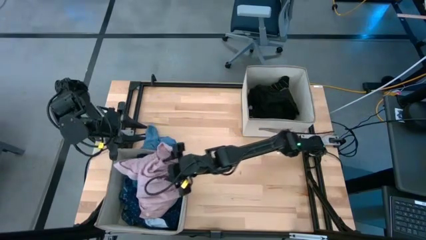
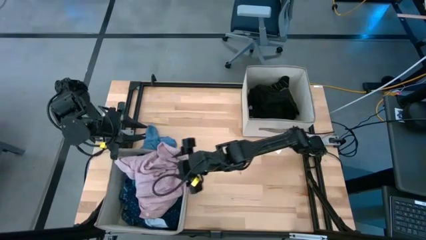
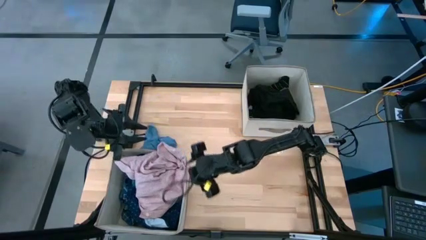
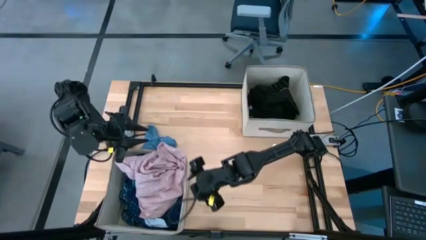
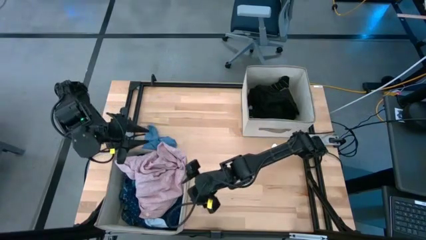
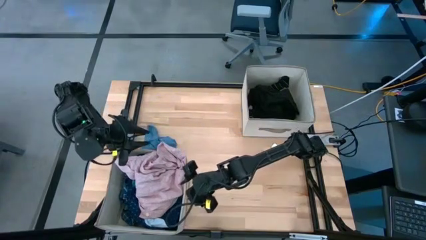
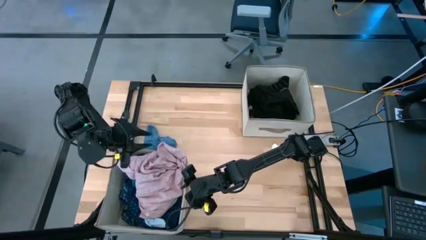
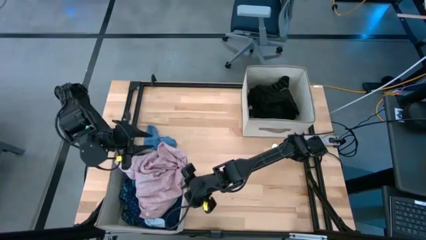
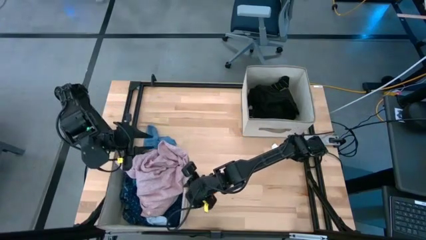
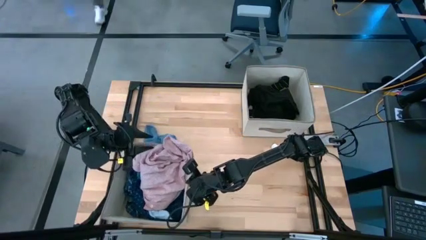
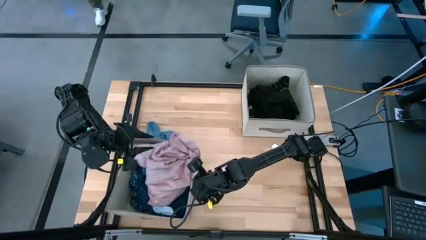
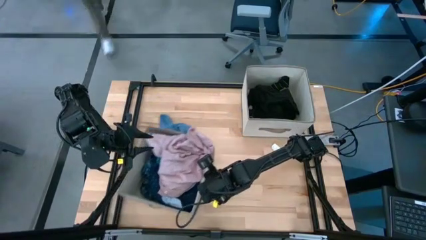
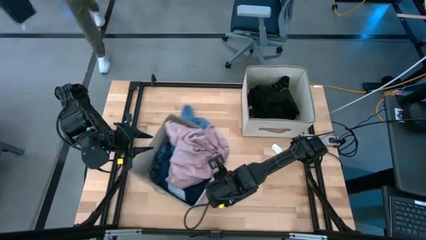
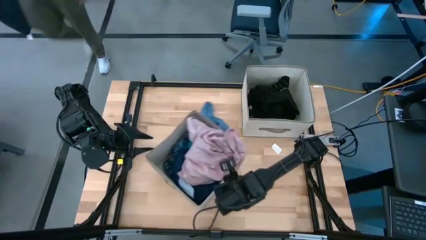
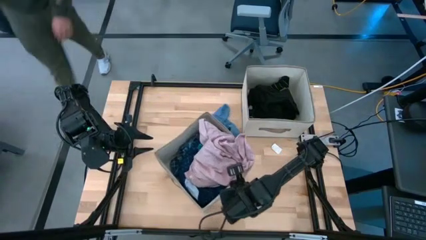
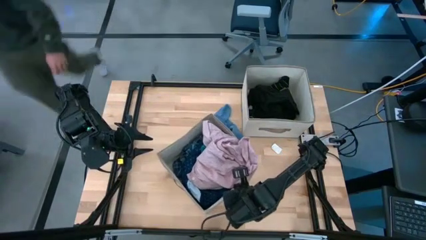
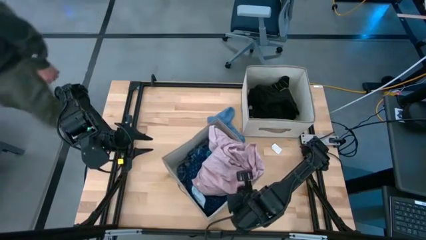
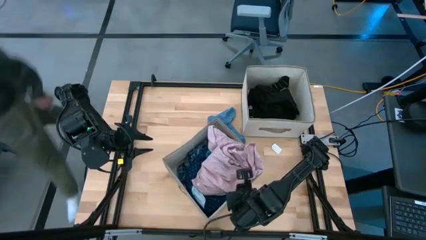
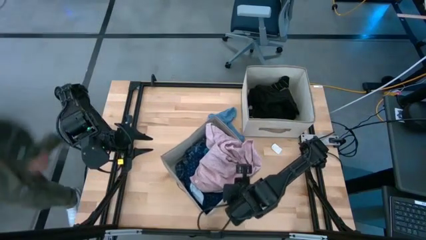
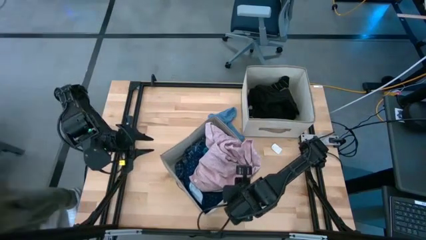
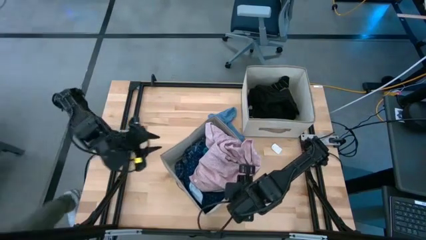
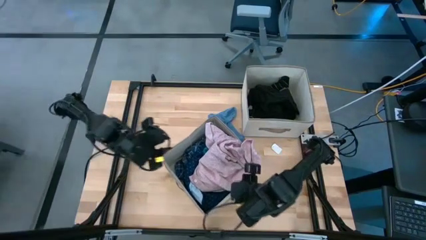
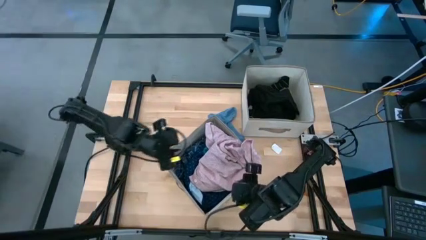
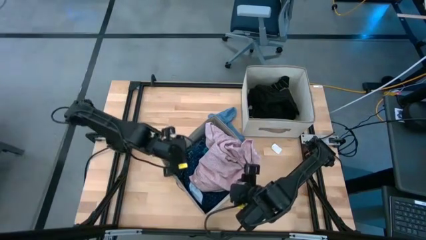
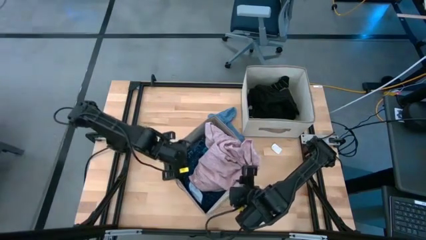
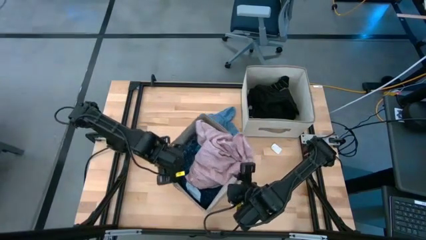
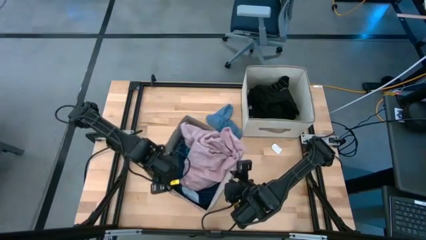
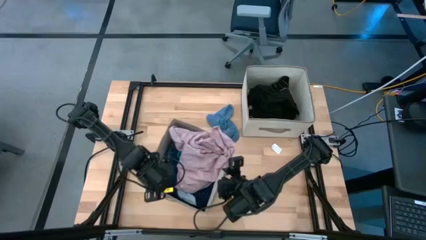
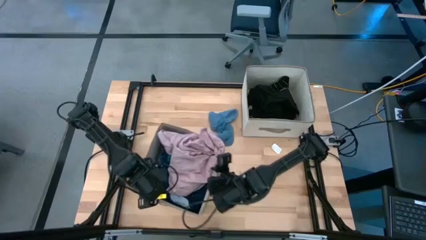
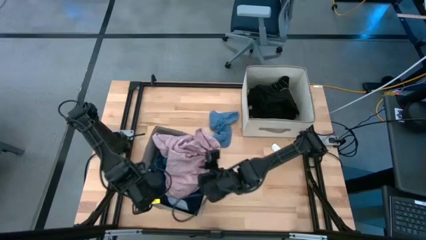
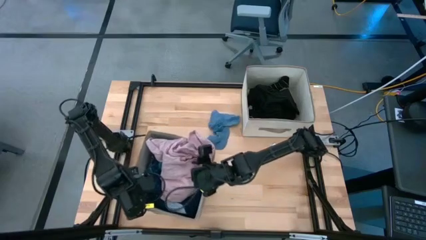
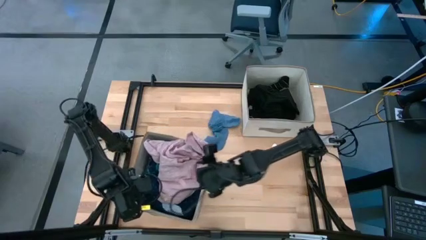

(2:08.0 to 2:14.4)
Task: Sort clothes
Adjust the bottom white laundry organizer on the table

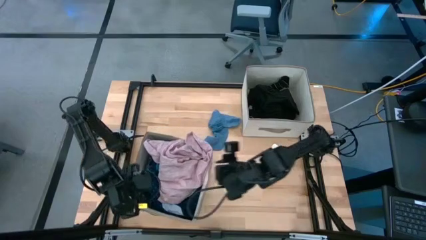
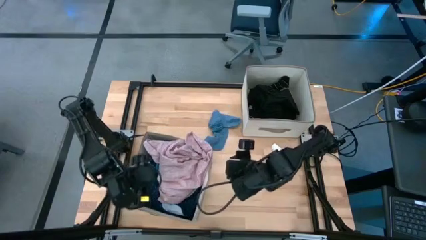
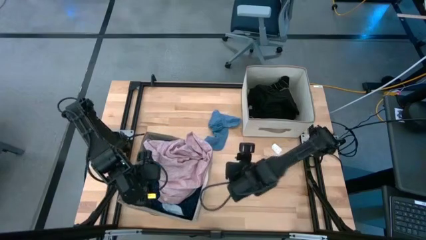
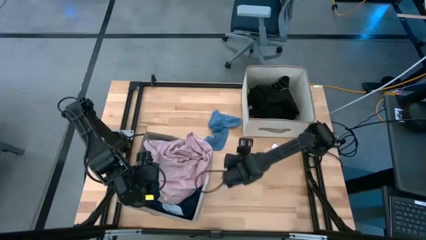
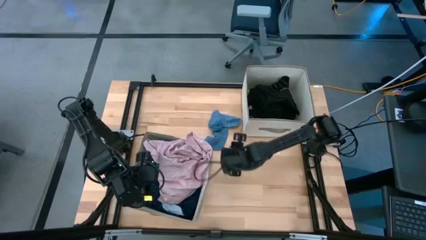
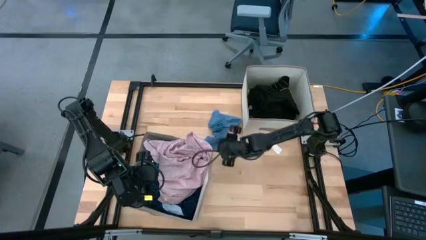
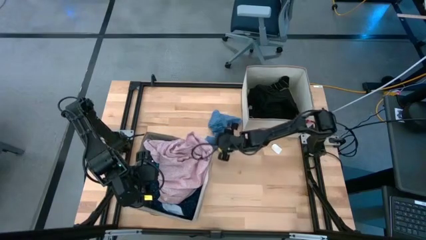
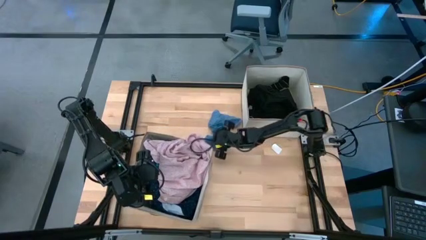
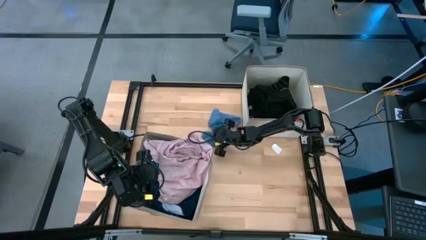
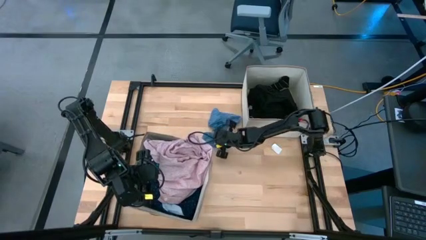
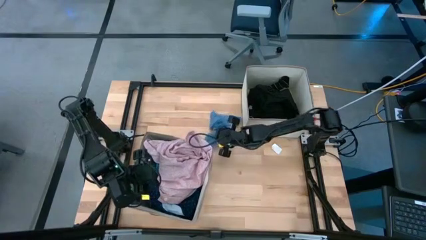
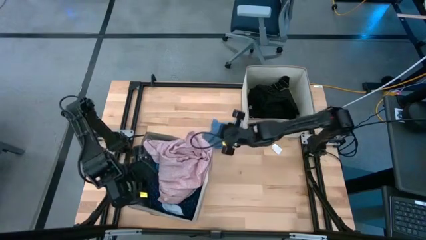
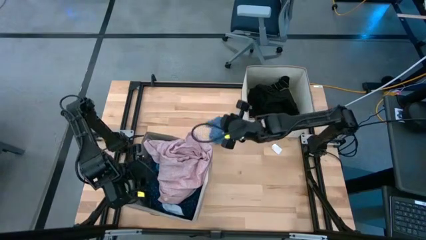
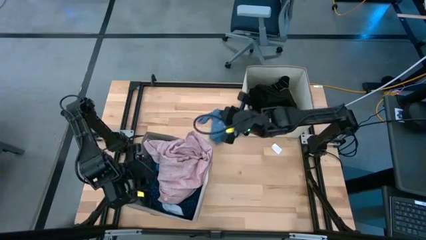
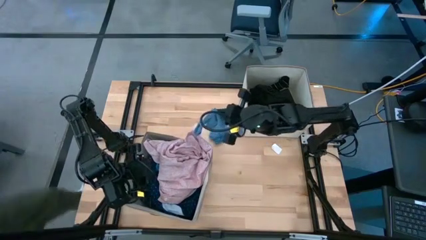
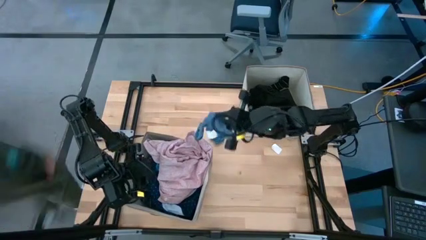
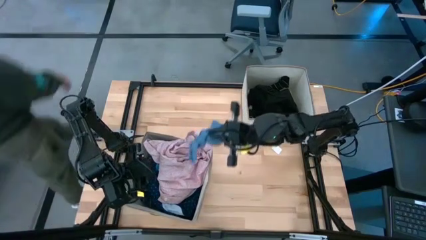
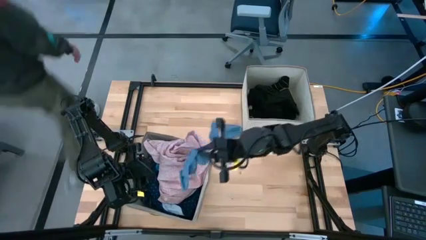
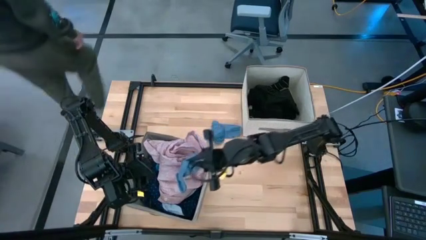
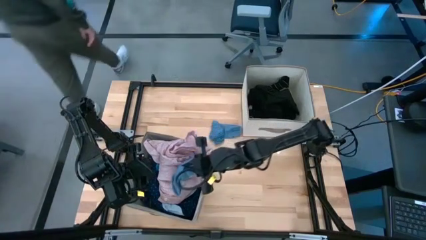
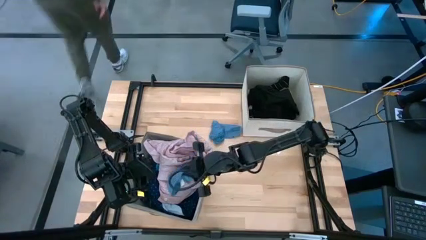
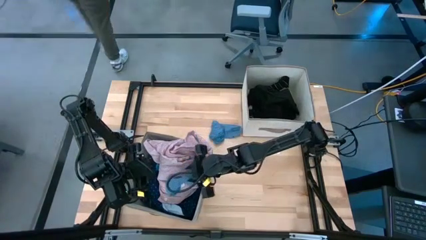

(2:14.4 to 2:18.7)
Put the blue sock into the bottom white laundry organizer

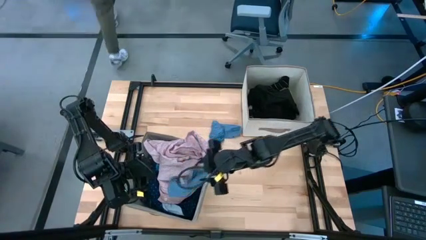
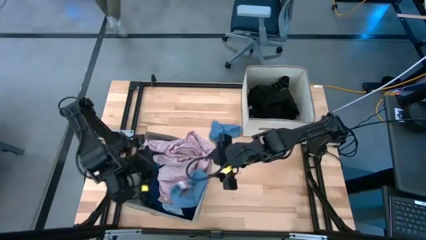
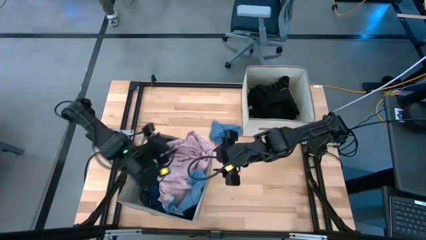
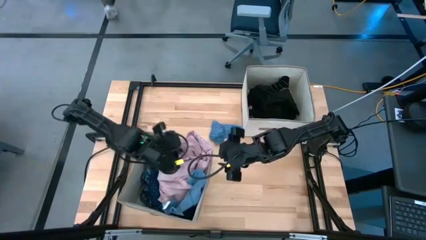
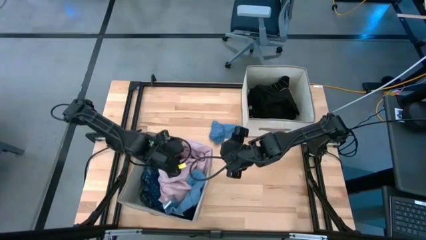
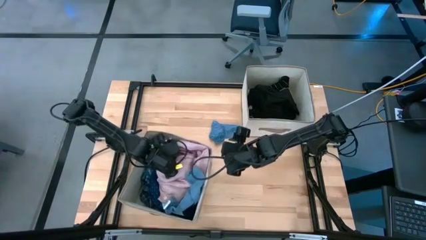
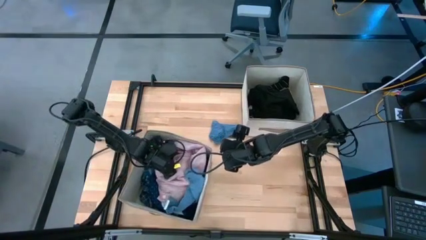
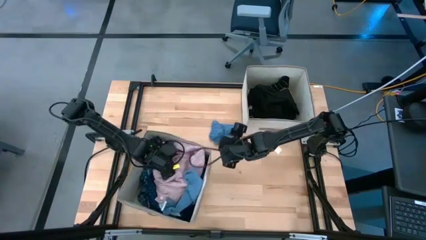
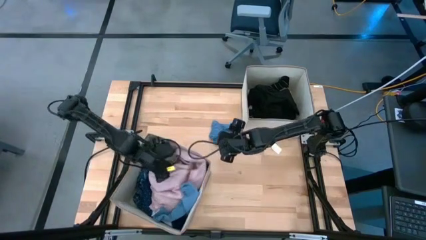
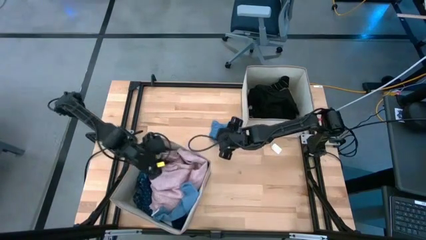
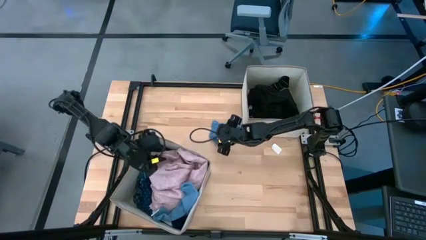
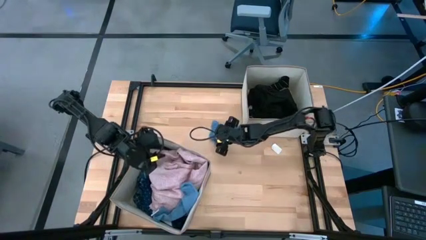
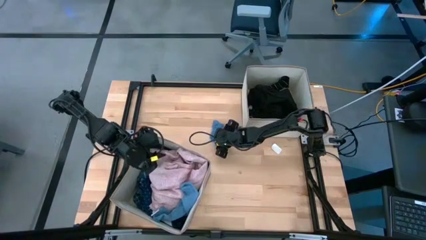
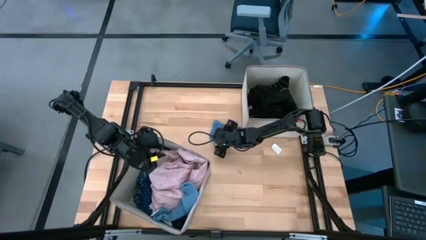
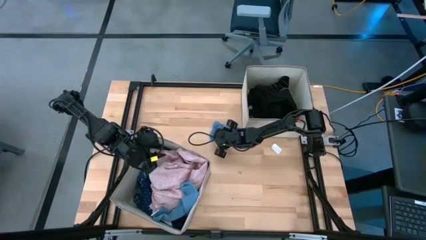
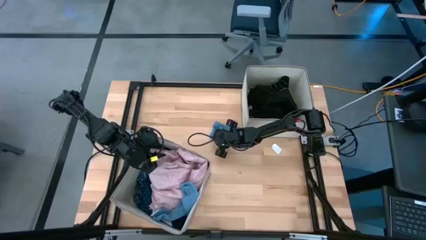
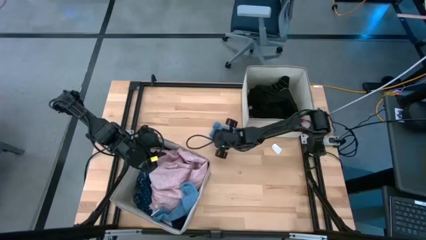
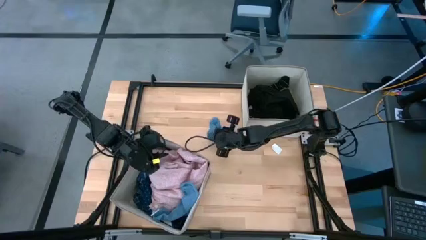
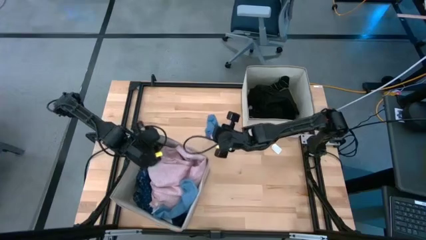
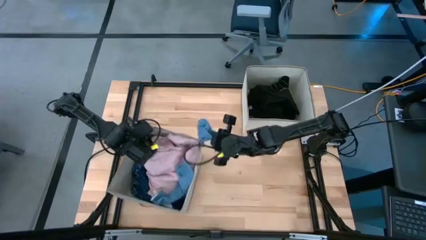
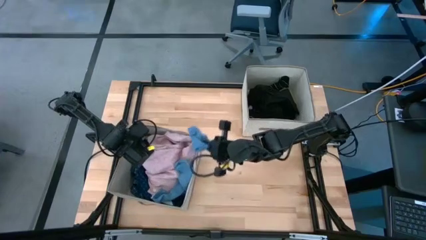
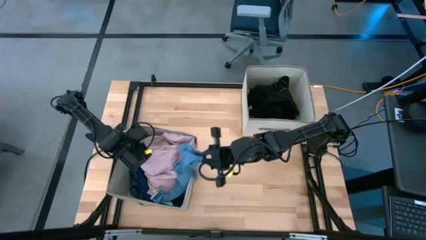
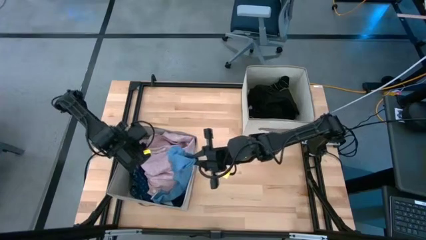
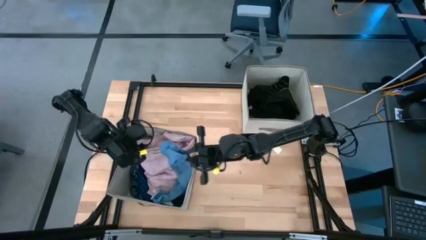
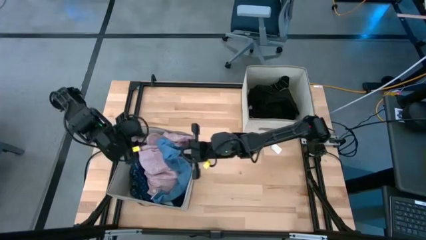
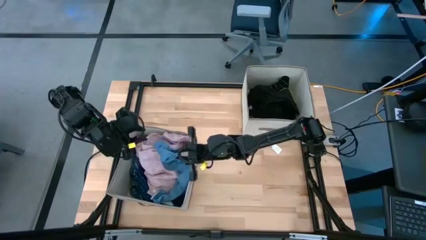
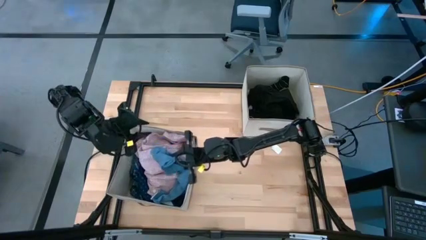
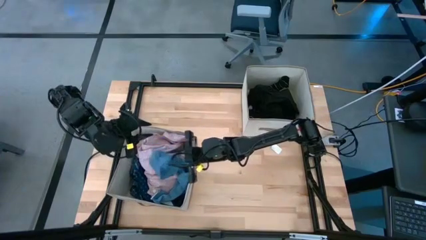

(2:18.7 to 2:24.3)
Put the blue sock into the bottom white laundry organizer
